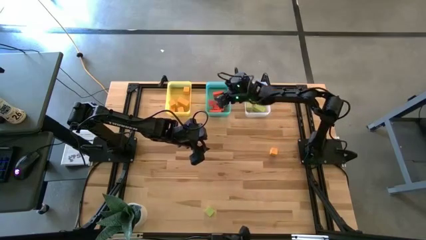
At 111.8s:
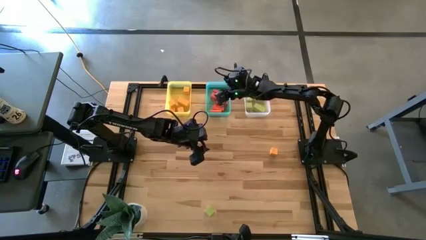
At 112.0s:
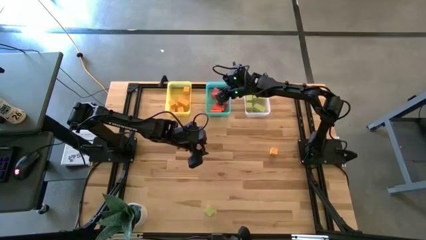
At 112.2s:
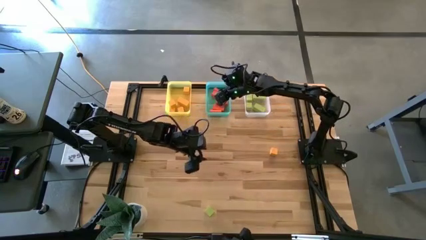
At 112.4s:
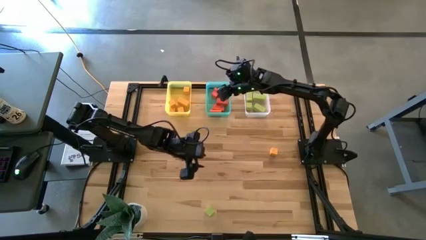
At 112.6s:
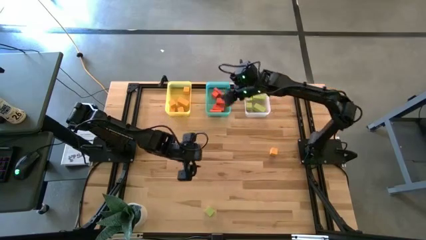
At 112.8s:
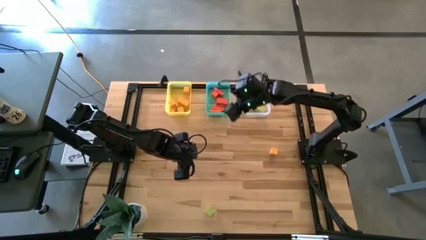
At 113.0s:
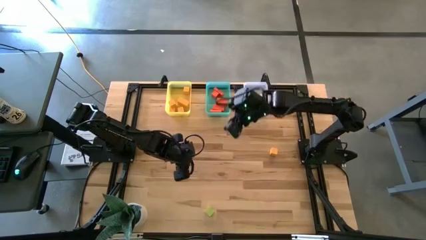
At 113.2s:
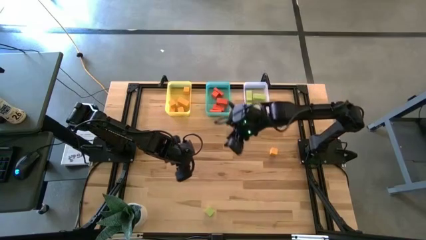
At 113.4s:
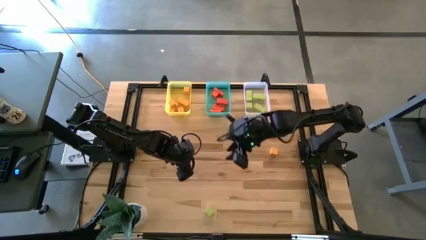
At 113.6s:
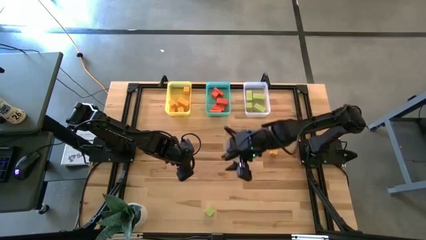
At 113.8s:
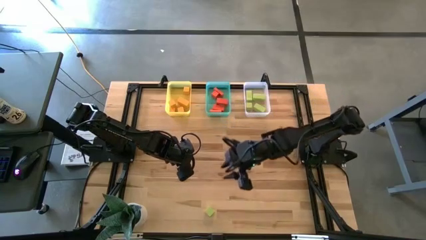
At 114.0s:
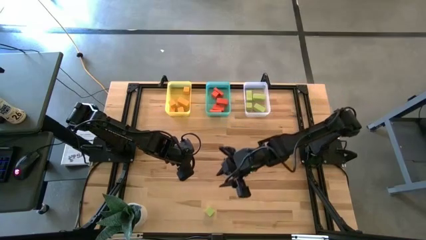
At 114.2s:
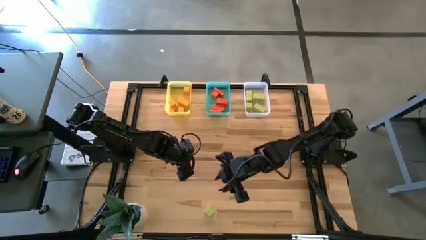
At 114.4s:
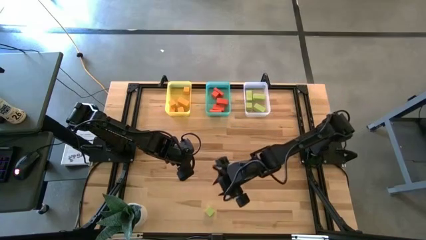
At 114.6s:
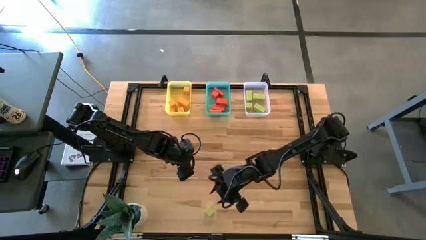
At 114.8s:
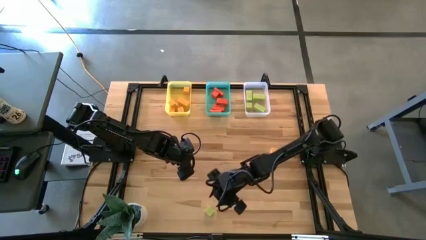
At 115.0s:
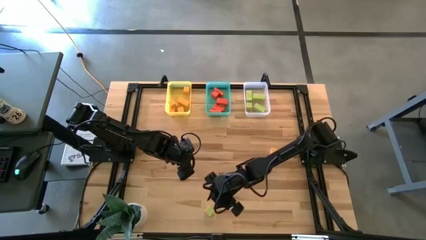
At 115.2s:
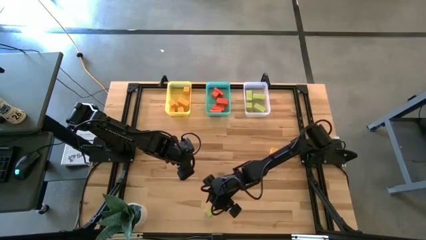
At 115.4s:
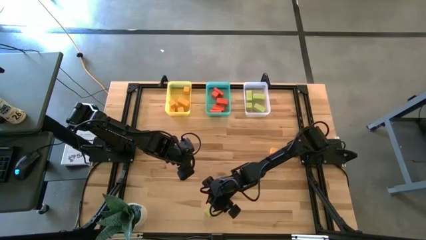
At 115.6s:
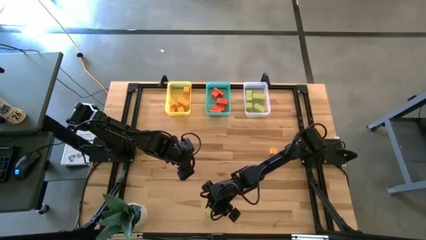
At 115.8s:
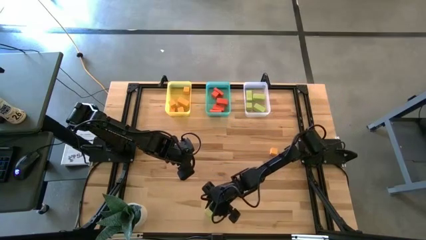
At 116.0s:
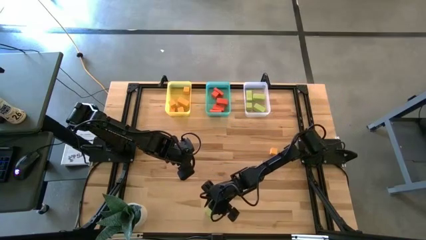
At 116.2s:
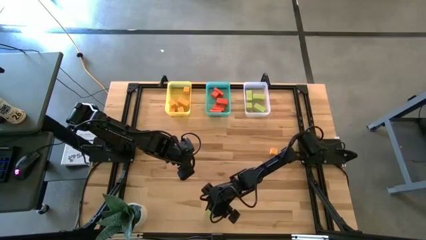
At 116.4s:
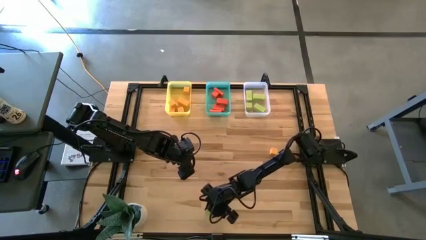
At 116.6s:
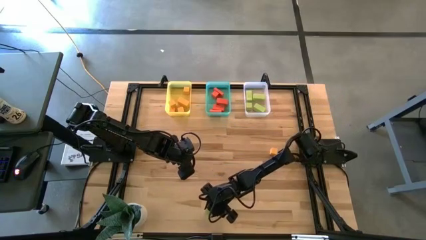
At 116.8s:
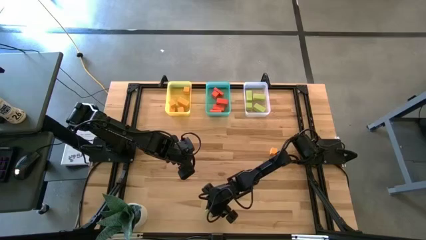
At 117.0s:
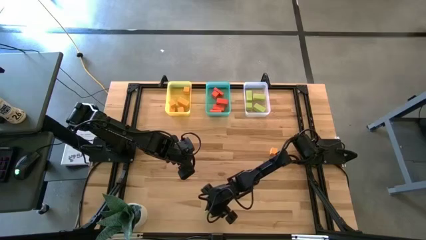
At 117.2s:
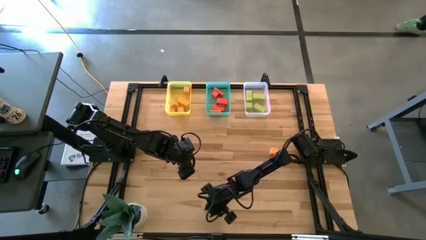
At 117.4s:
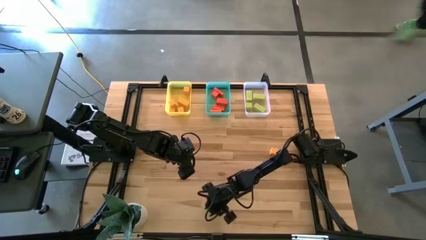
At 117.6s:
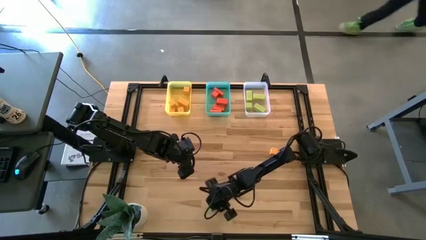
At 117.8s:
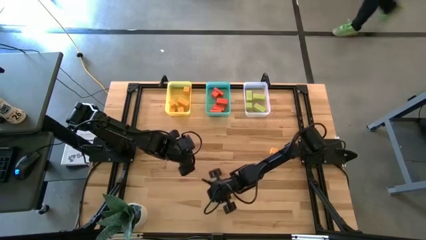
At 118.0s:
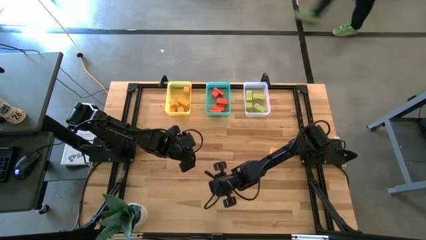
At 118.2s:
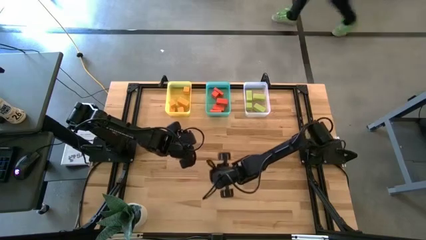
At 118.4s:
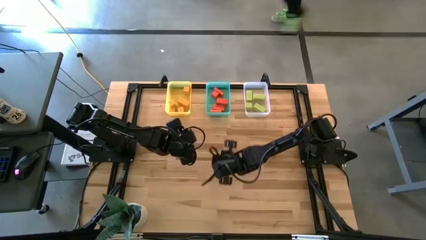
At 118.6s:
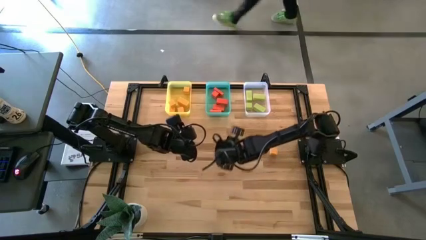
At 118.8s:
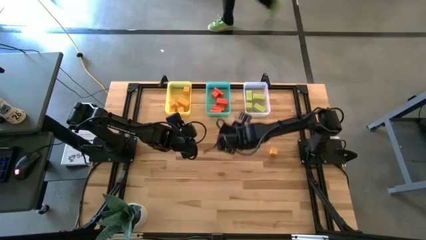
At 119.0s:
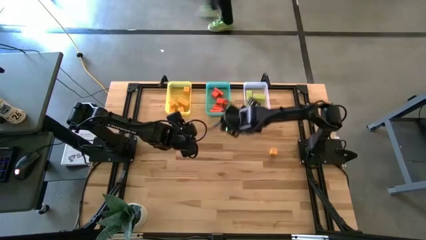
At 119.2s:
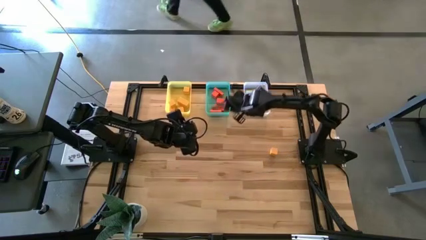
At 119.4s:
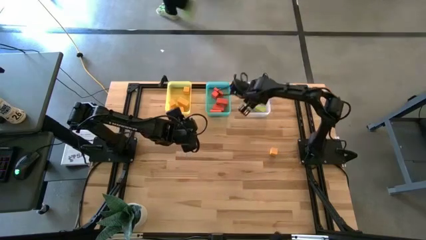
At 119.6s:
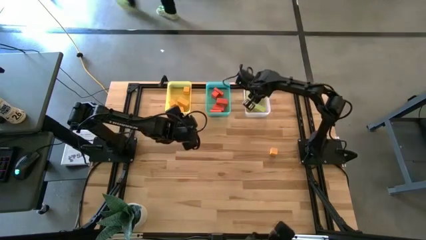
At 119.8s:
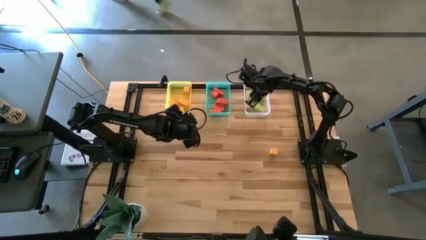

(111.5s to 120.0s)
Task: Sort & place blocks by color
Put the light green block into the white bin

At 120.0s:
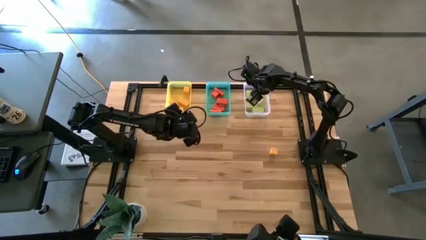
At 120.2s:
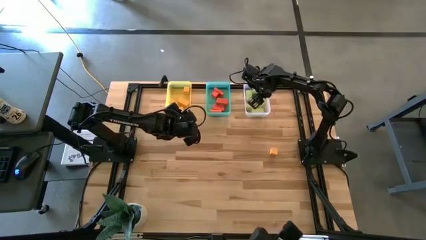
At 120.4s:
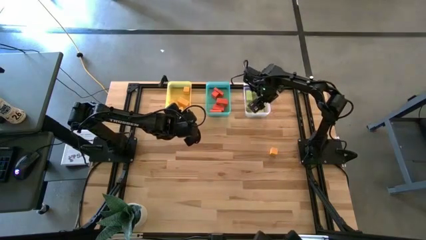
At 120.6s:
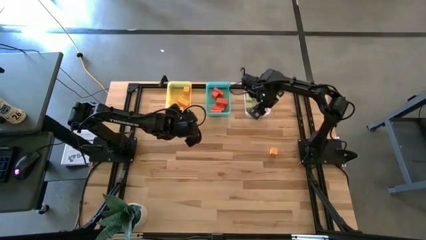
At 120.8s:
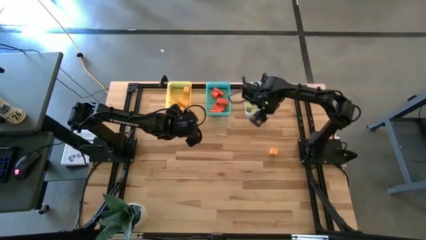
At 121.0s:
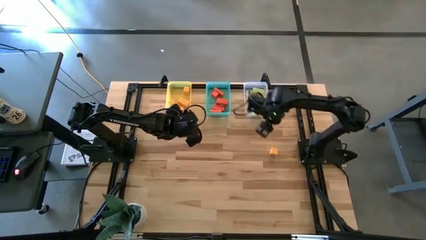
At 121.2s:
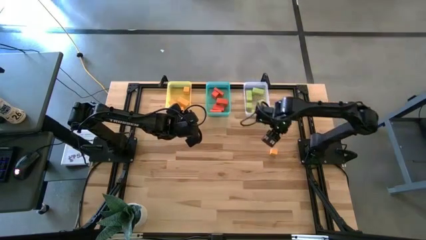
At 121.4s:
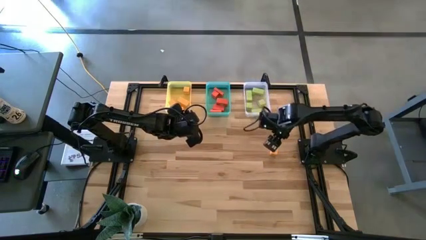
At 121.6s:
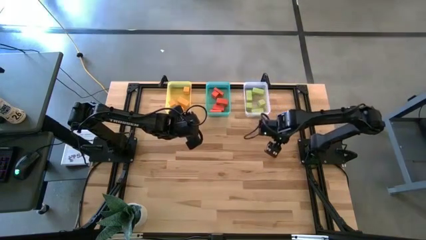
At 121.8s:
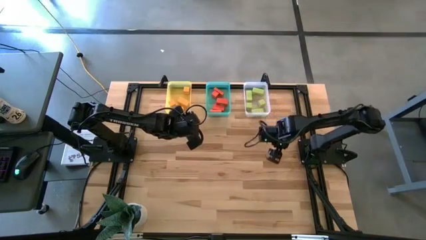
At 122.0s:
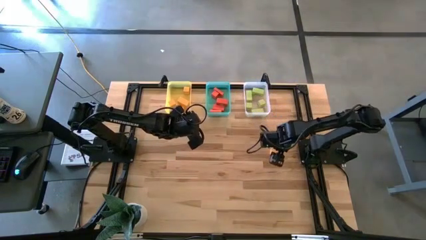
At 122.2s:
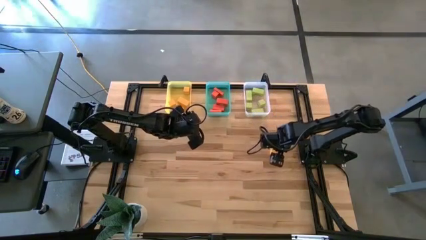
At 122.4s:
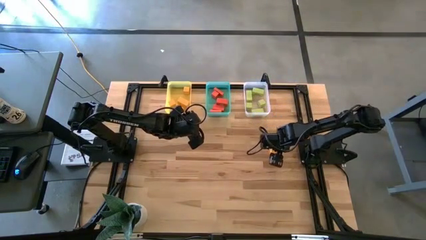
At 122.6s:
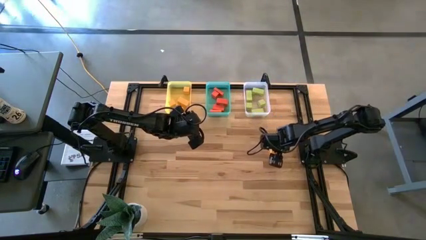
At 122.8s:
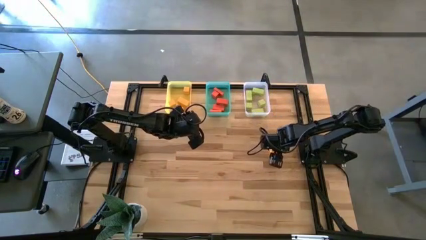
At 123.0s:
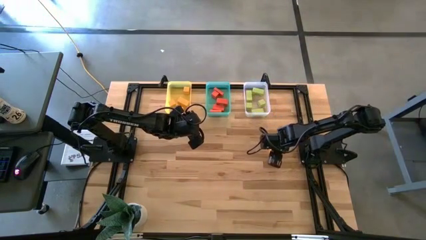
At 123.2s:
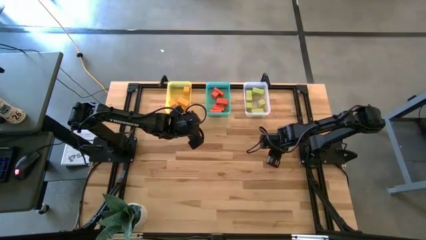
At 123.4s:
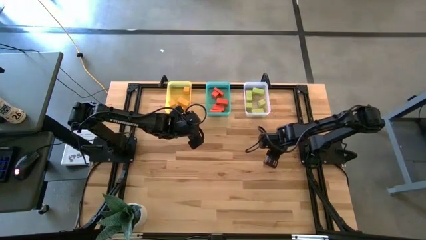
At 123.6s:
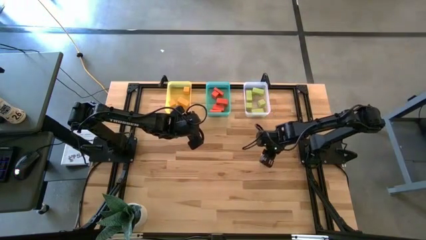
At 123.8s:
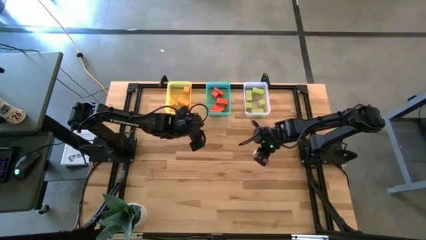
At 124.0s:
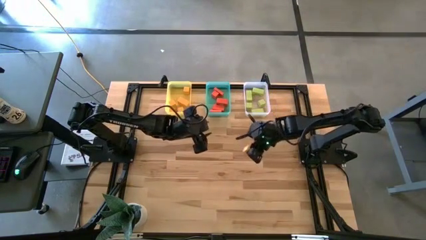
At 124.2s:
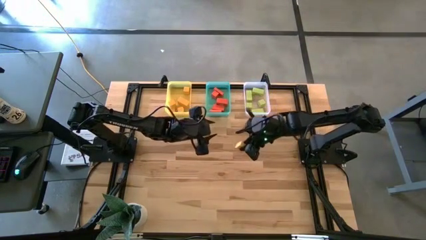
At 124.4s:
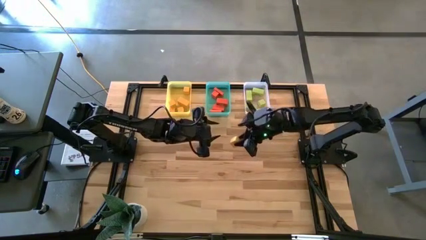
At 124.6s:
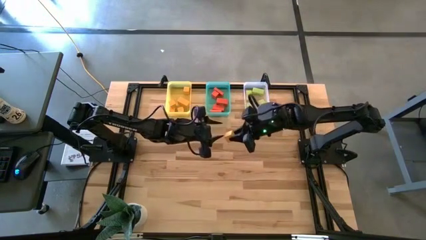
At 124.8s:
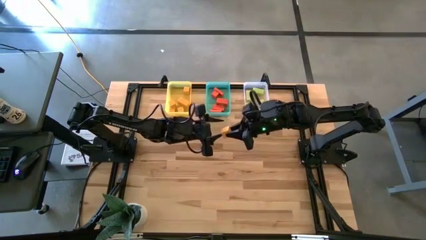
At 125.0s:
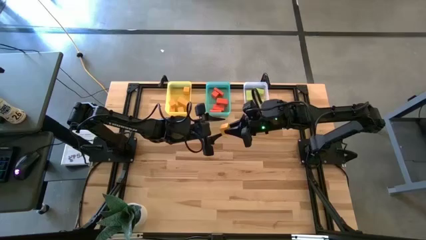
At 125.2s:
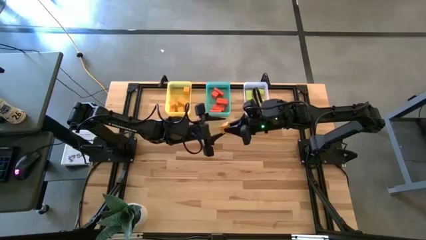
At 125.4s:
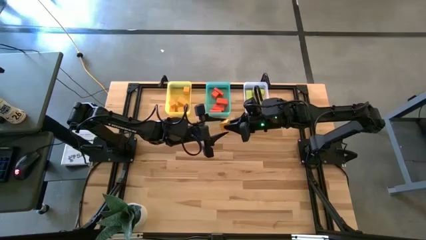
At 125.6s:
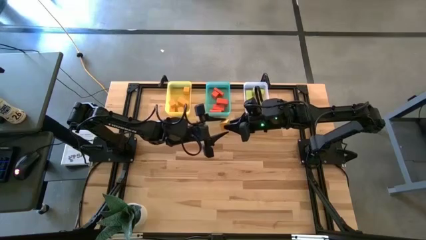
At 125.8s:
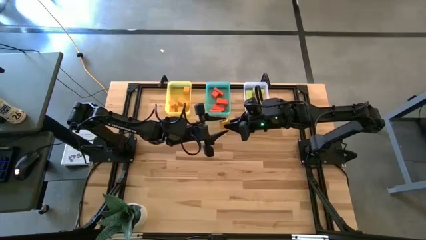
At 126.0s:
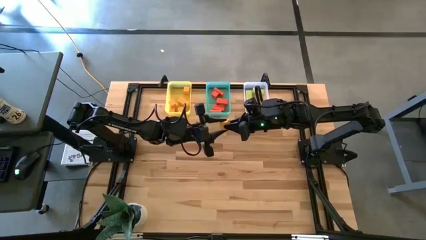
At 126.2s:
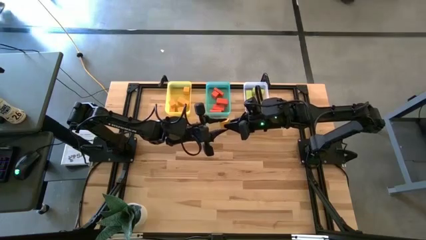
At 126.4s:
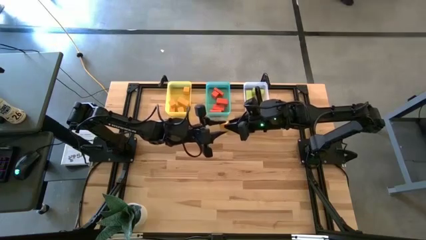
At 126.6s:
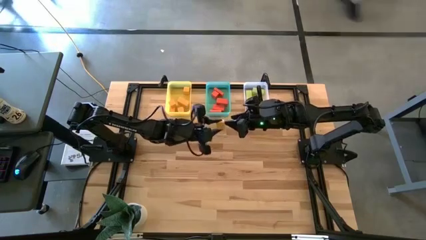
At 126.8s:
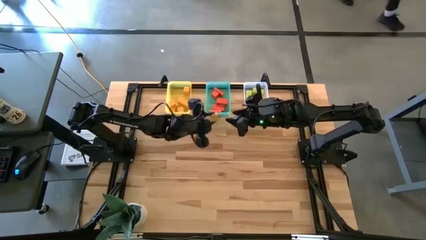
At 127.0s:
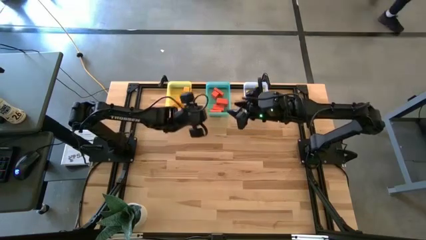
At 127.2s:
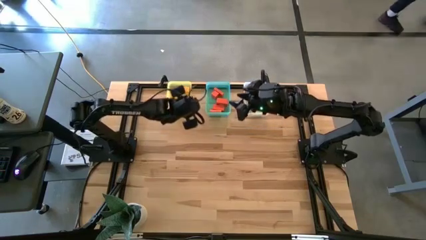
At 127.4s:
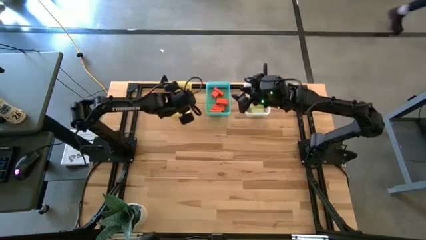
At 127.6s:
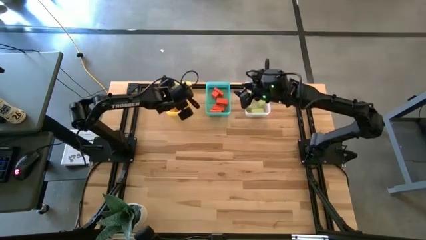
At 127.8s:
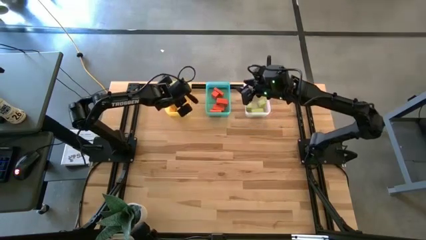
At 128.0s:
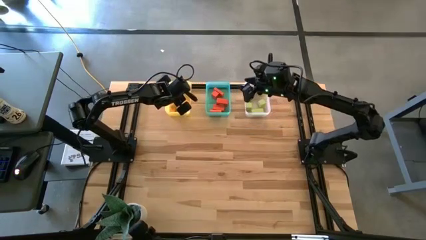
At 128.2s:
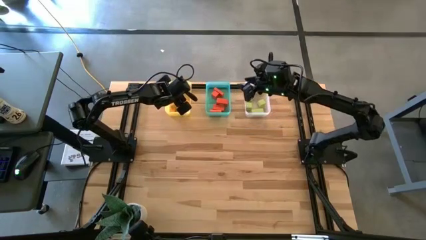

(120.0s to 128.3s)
Put the yellow block into the yellow bin
